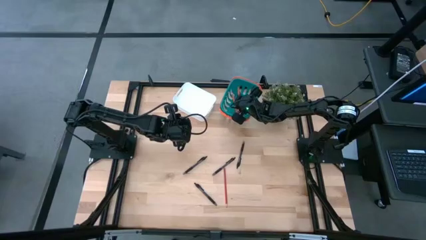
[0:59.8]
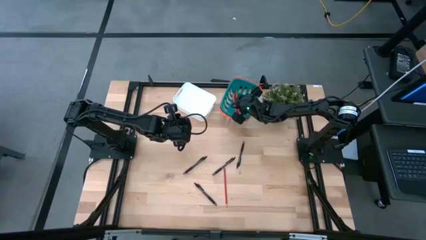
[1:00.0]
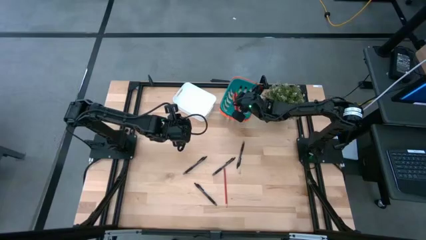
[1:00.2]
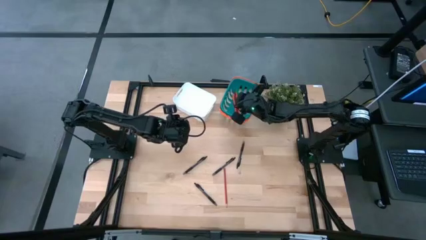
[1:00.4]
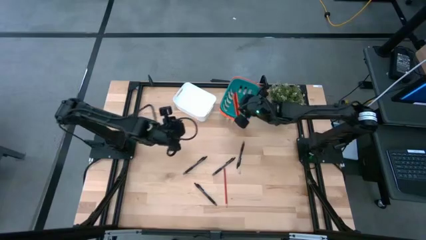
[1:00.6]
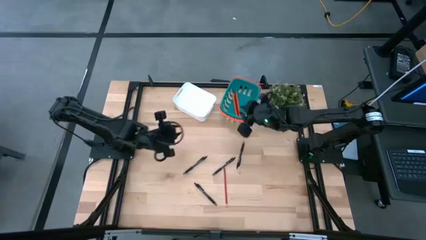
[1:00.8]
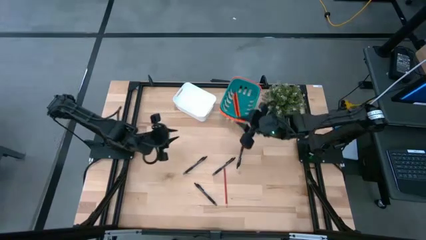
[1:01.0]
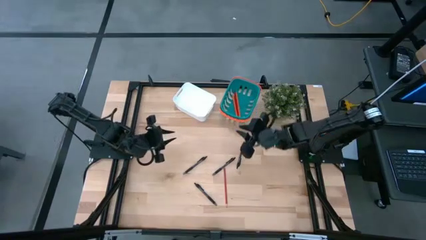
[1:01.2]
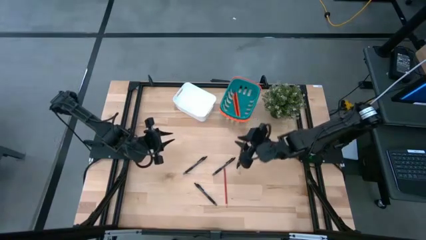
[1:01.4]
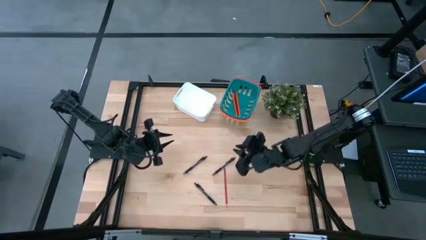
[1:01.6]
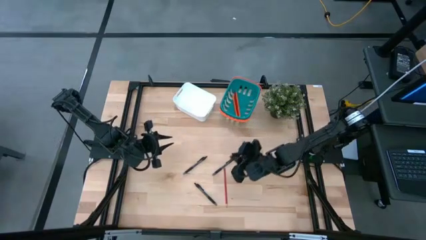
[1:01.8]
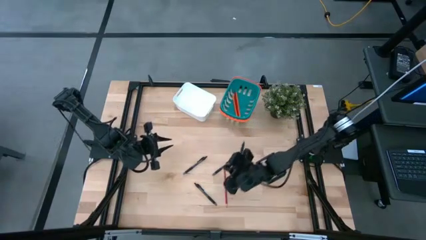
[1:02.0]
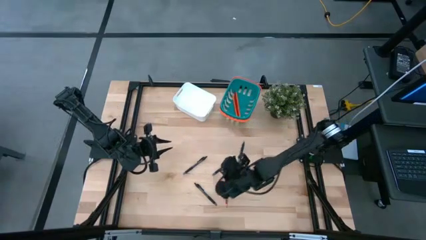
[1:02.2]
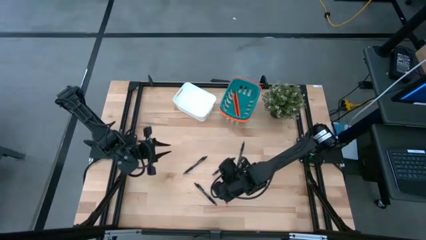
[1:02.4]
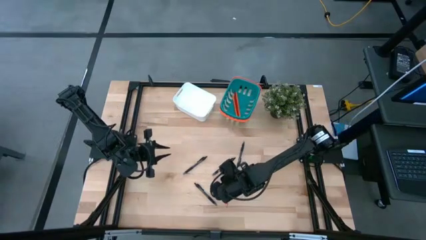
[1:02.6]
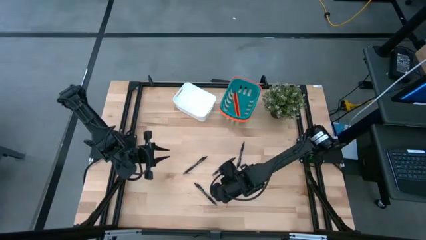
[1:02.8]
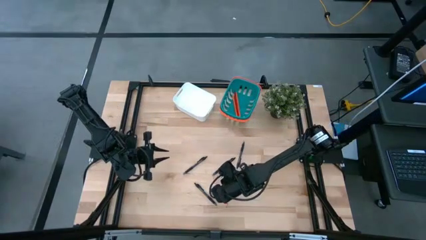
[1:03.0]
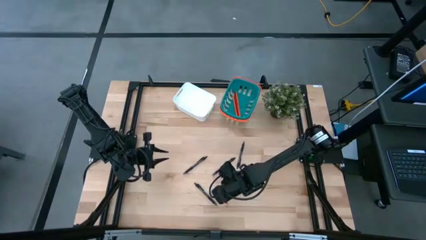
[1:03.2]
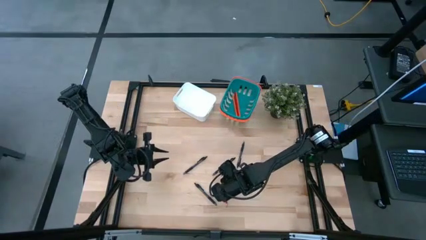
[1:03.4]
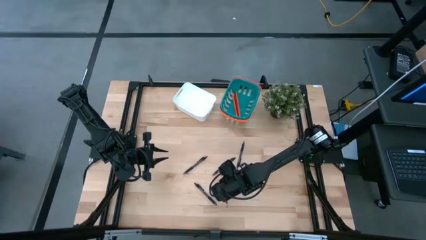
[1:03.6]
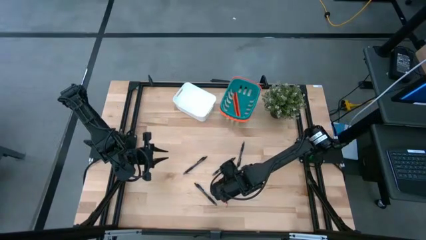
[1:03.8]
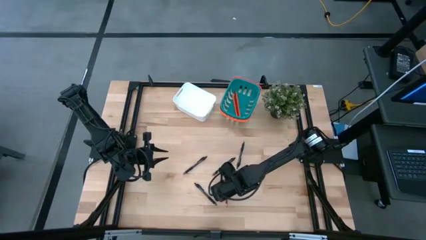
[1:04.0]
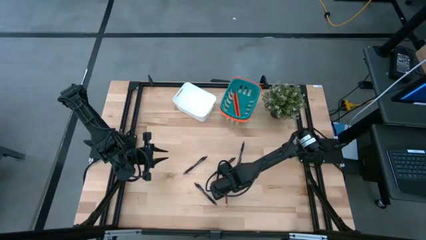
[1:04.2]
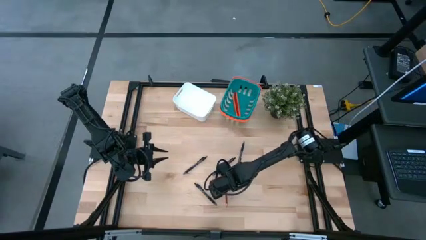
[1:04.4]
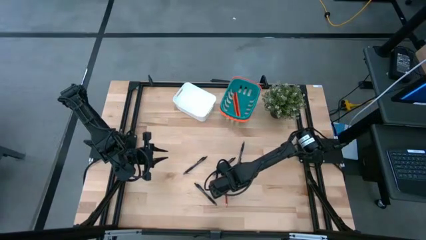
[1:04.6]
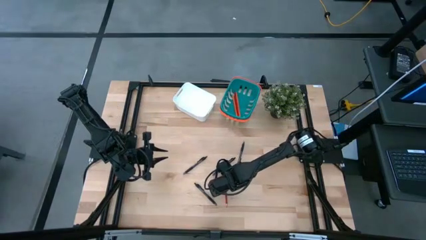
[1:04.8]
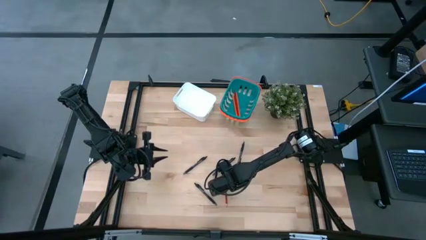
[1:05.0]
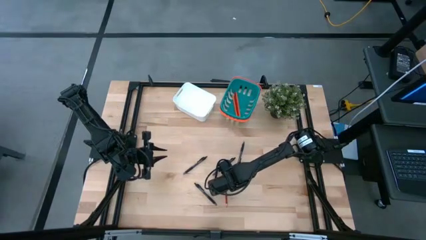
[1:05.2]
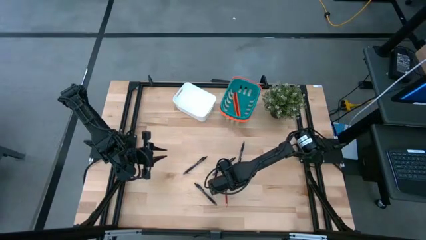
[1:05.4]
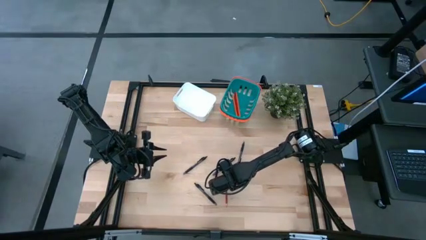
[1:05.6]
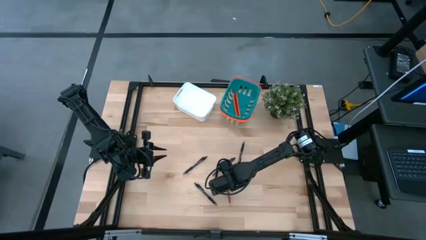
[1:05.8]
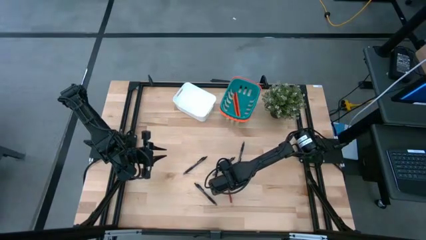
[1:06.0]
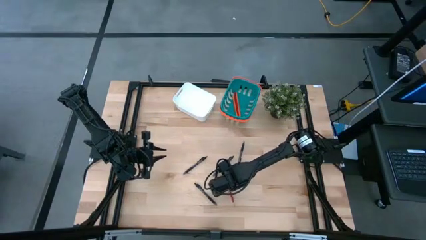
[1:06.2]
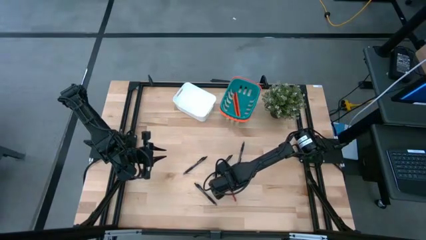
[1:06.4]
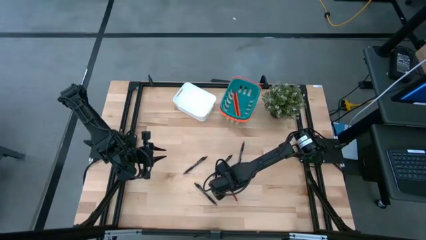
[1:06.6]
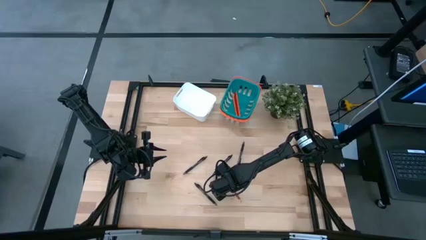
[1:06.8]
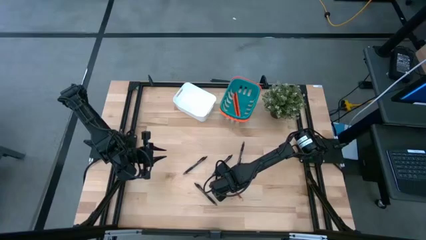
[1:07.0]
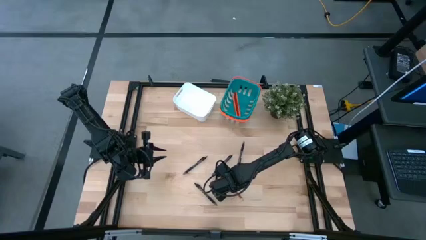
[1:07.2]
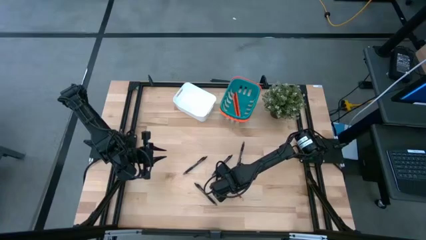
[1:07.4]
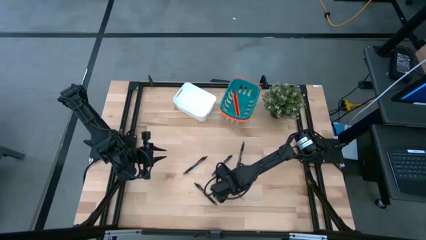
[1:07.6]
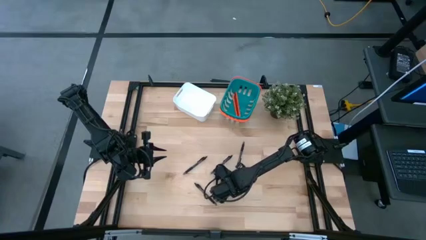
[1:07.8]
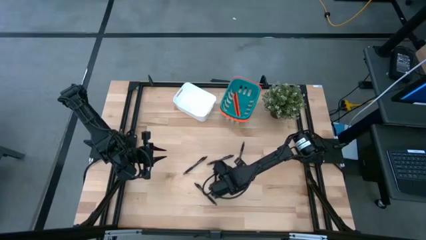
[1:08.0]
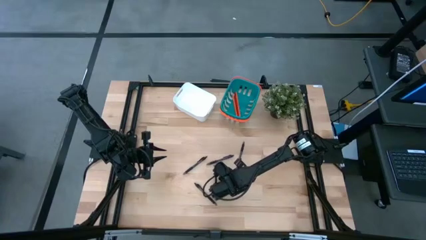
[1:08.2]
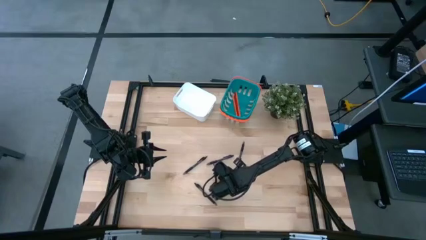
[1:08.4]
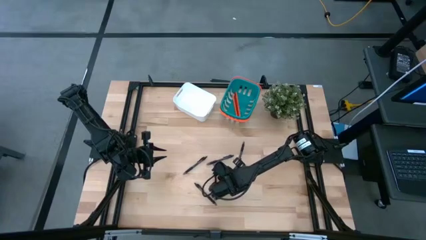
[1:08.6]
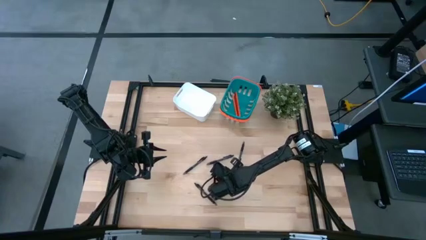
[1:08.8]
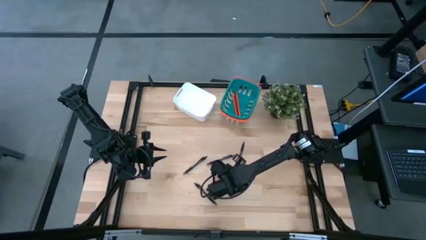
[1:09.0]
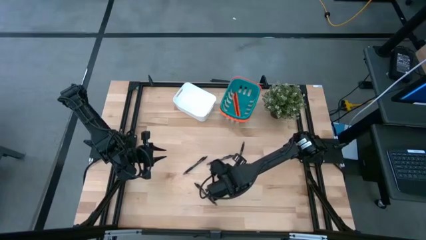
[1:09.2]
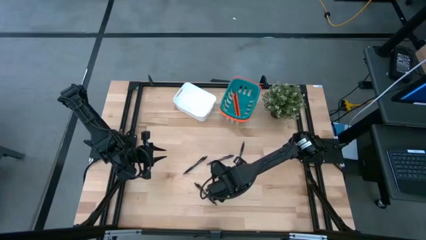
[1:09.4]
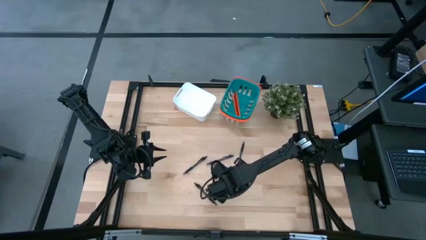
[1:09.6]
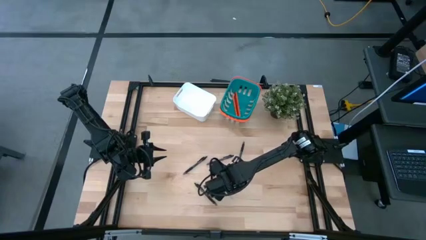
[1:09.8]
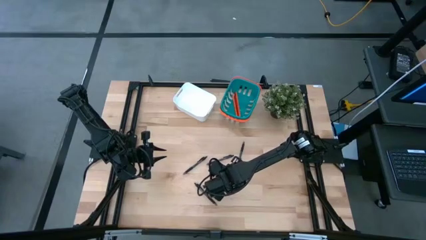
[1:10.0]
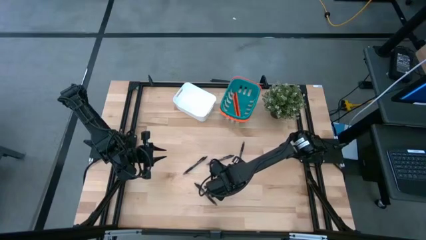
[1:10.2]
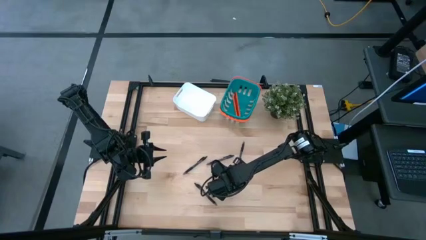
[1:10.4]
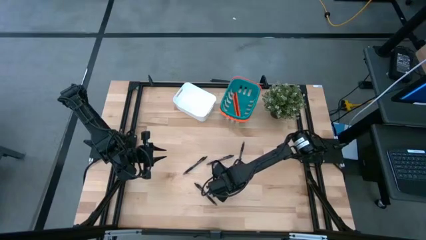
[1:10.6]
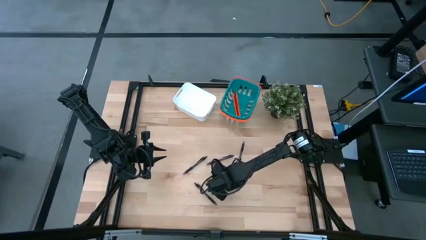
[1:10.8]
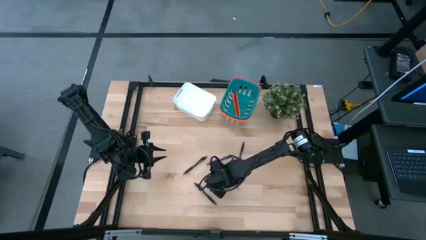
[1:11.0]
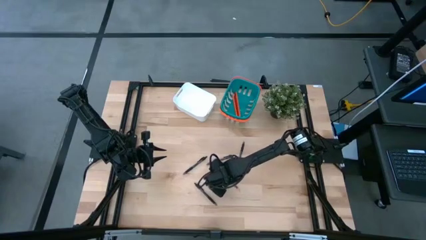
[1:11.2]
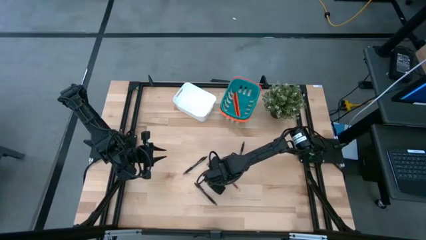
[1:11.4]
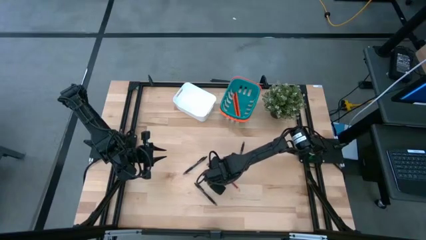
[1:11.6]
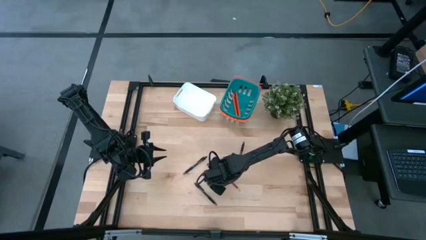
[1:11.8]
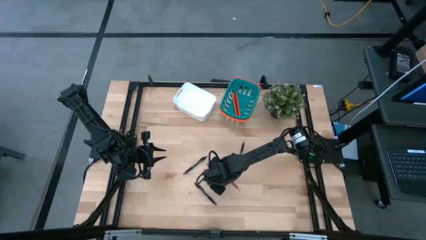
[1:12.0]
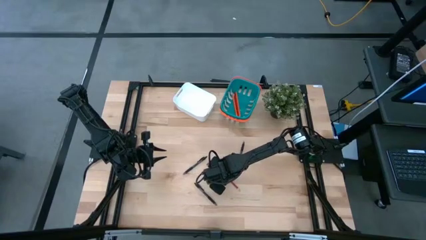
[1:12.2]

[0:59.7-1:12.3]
Task: Sort pens & pencils
Put the red pencil into the green basket

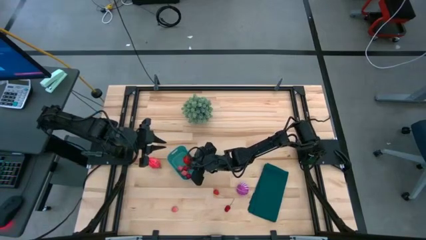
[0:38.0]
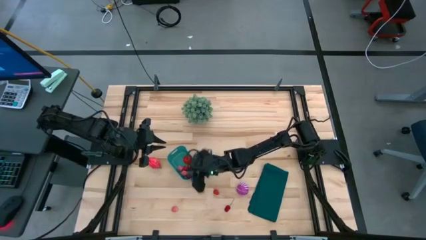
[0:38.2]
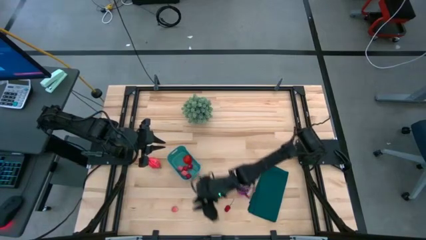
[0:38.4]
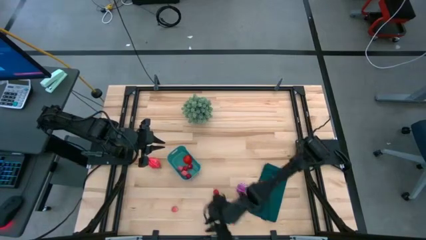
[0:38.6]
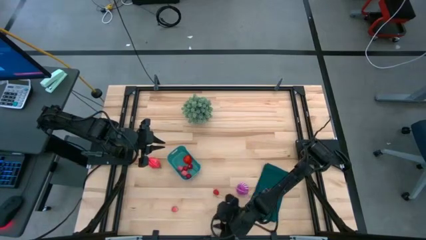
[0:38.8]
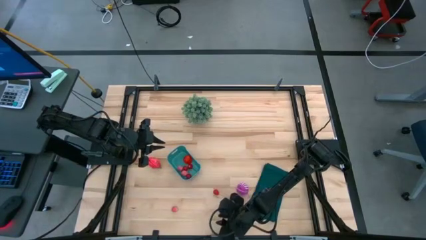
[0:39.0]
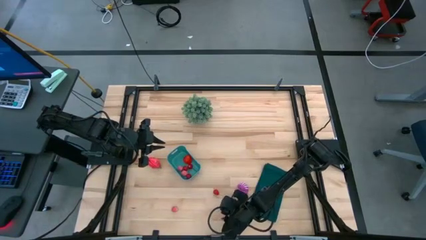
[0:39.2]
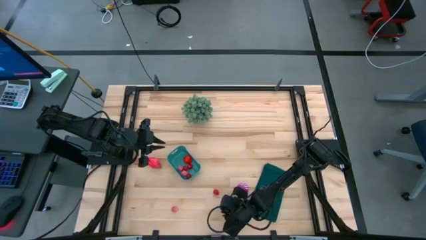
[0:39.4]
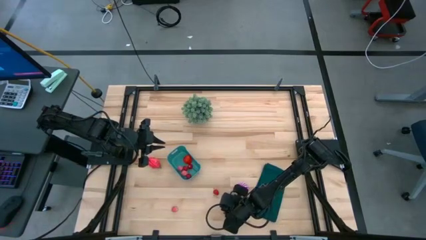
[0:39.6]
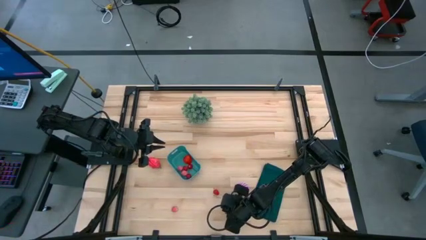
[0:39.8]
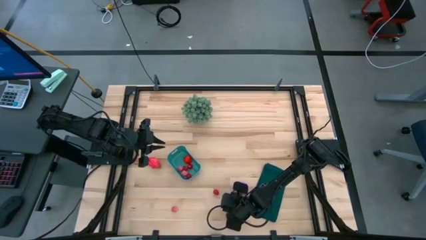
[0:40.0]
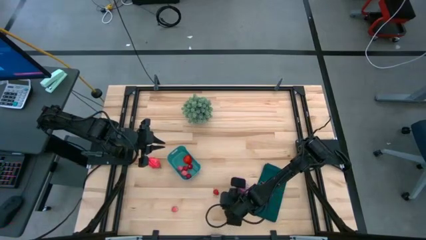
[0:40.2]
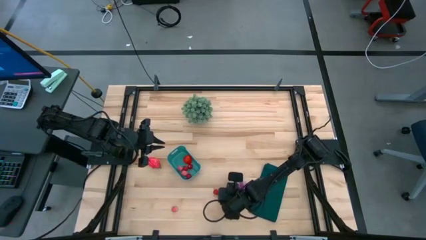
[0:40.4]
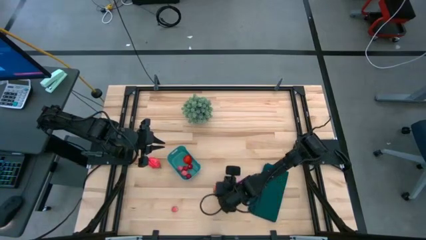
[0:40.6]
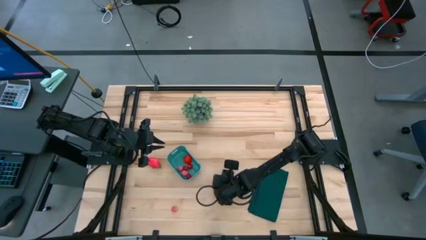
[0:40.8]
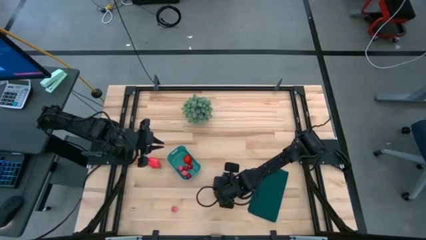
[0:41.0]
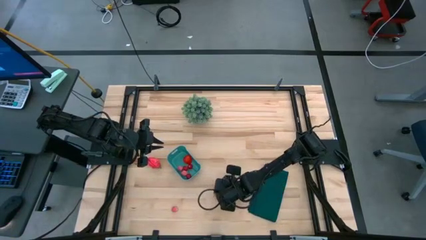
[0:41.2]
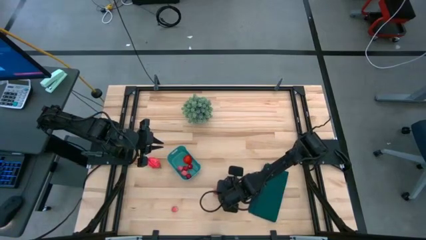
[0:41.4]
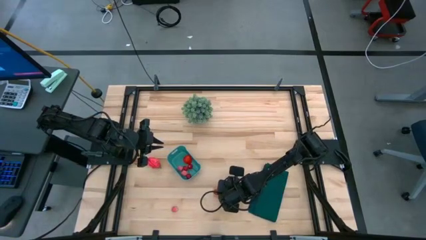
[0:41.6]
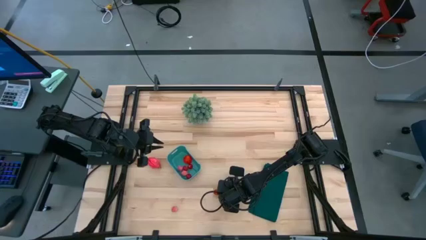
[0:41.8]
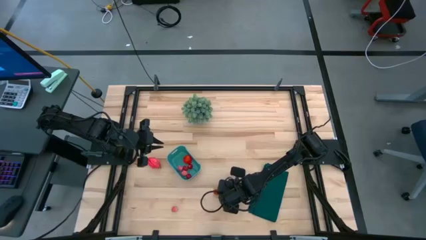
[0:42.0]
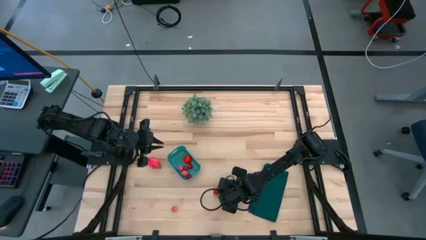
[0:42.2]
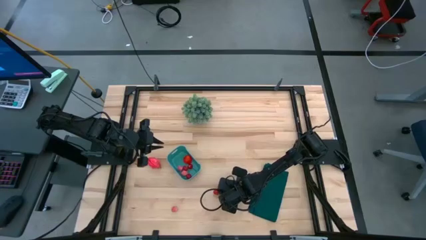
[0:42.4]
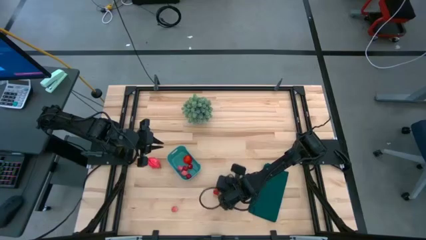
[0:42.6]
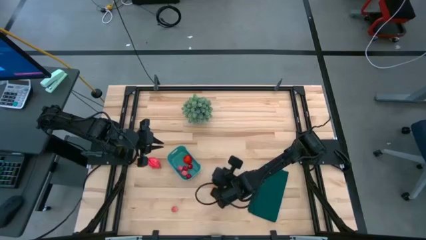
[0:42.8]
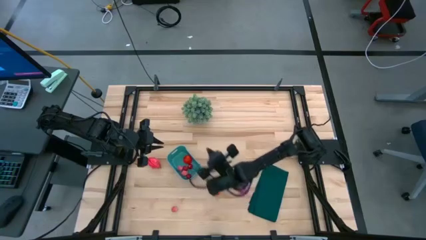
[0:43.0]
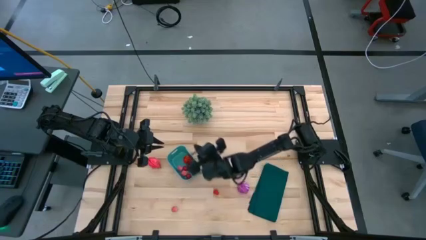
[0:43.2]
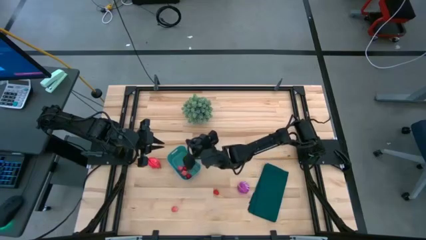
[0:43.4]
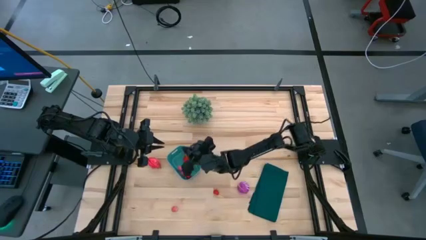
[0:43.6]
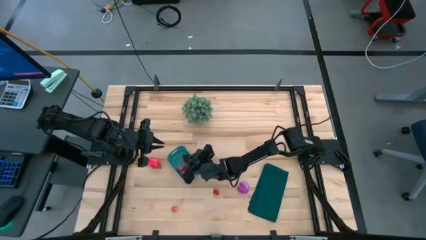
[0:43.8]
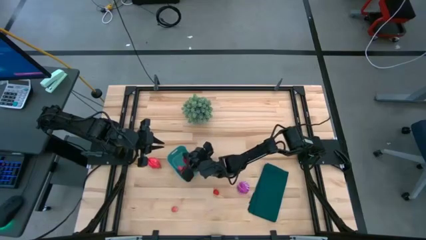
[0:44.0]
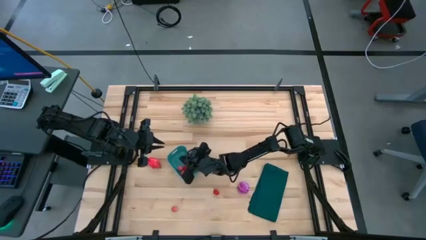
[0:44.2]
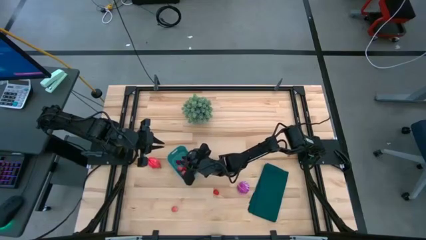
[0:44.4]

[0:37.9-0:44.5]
Task: Pick and placing Produce into tupperware
Put the red cherry into the green bin
